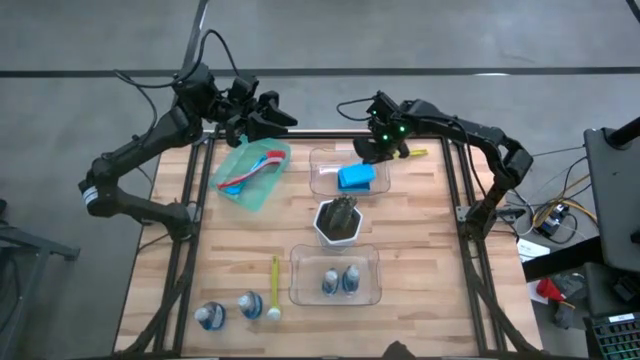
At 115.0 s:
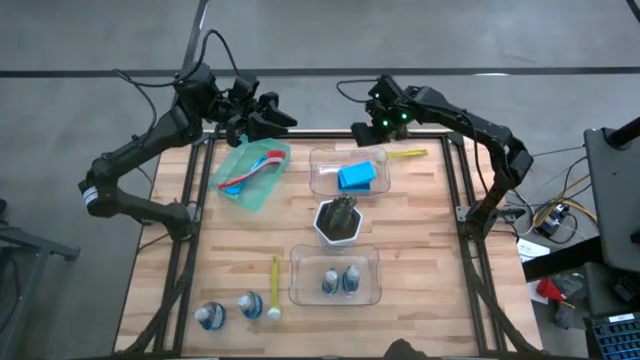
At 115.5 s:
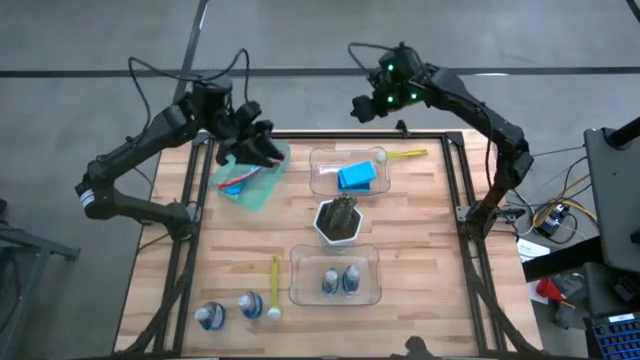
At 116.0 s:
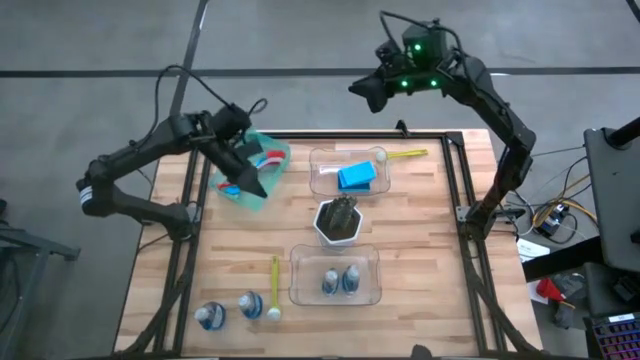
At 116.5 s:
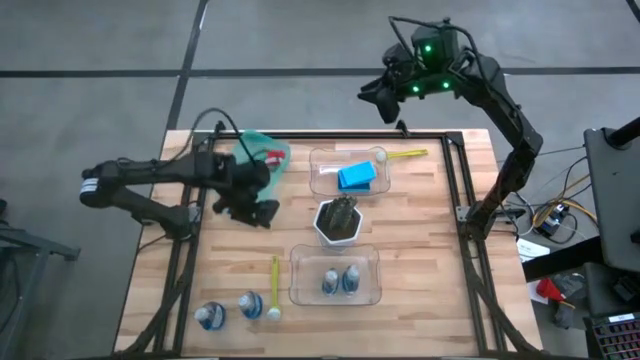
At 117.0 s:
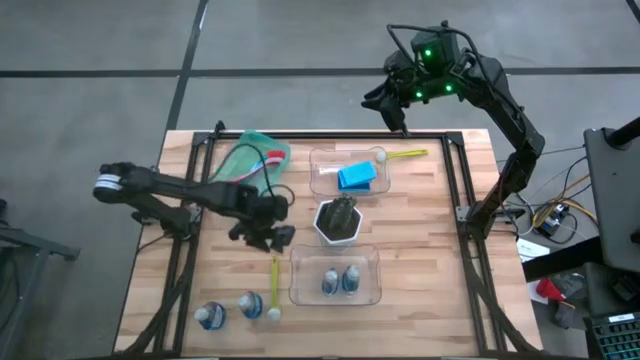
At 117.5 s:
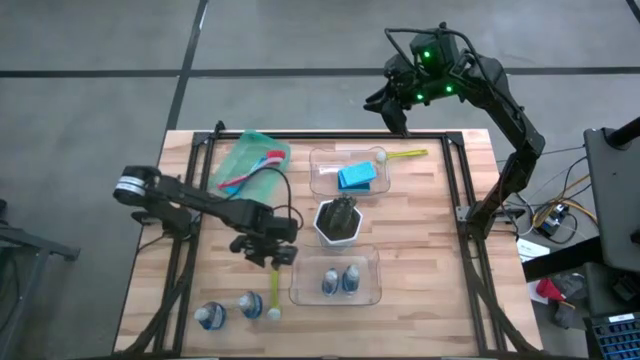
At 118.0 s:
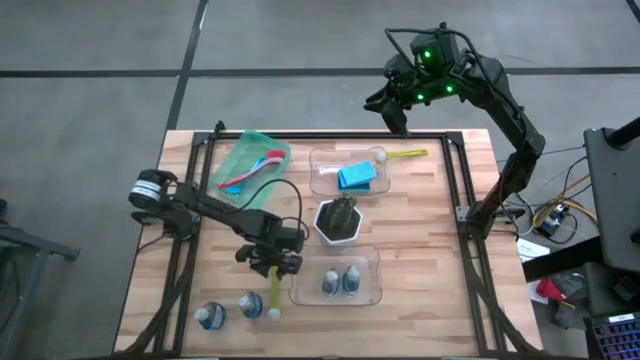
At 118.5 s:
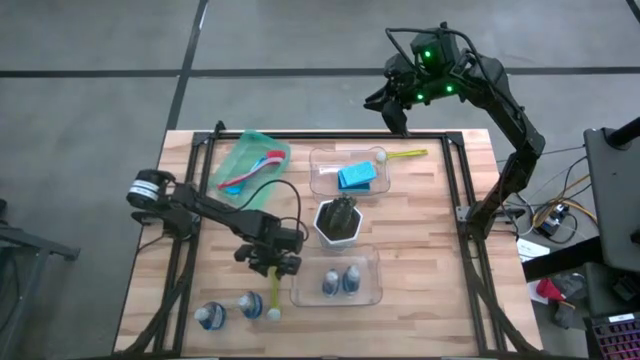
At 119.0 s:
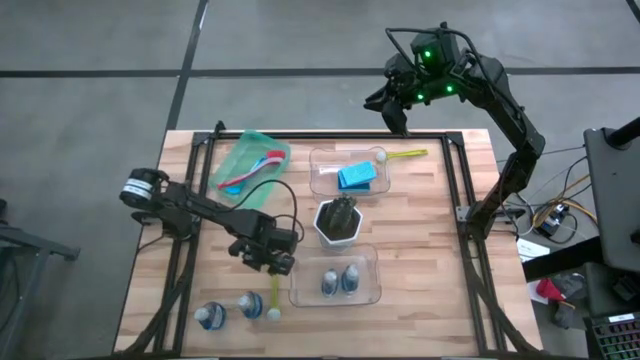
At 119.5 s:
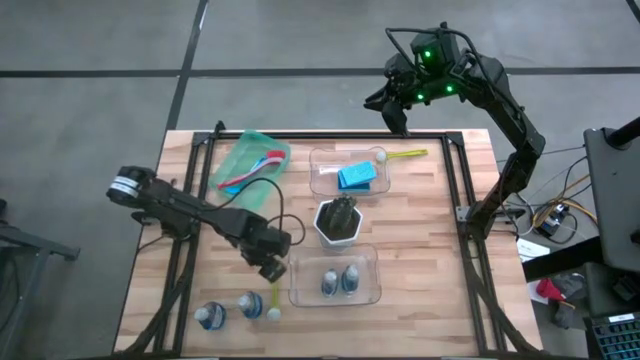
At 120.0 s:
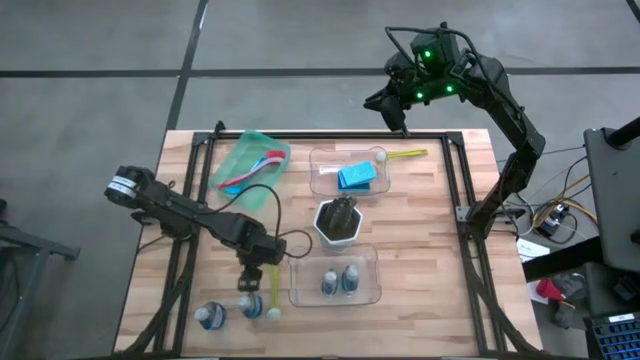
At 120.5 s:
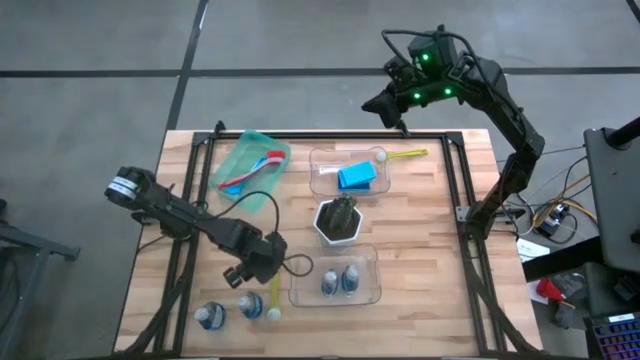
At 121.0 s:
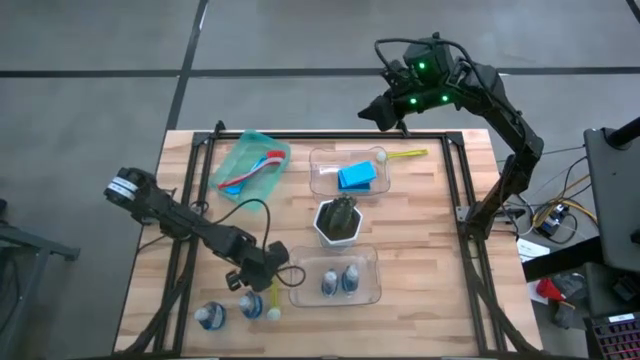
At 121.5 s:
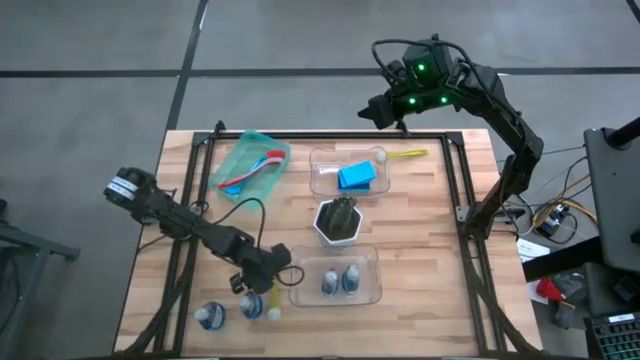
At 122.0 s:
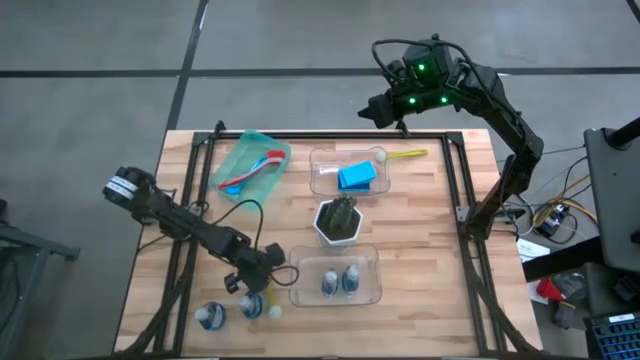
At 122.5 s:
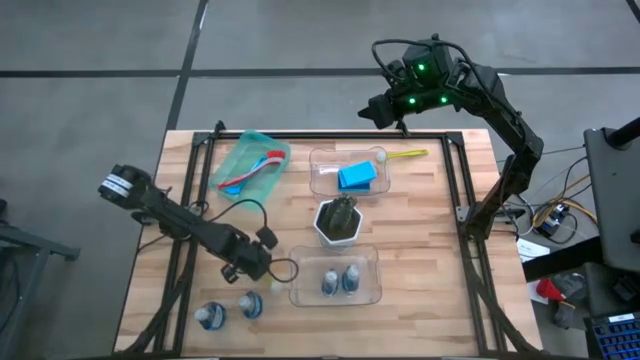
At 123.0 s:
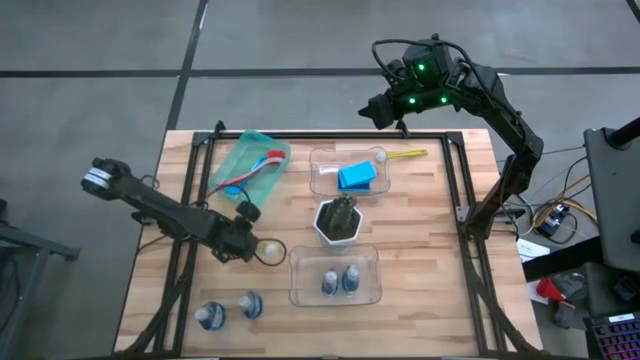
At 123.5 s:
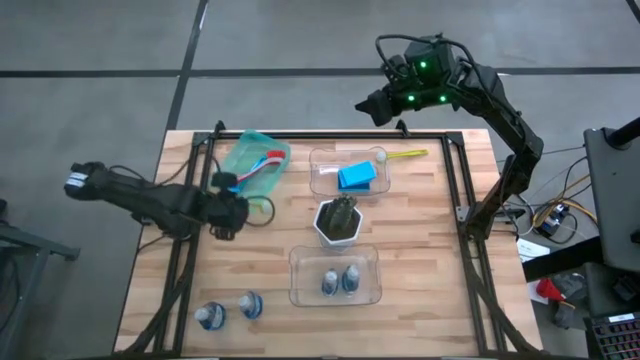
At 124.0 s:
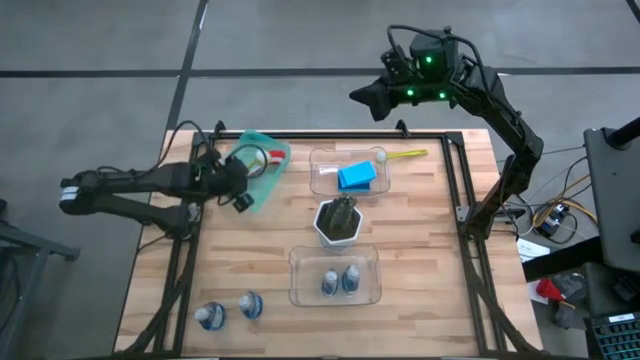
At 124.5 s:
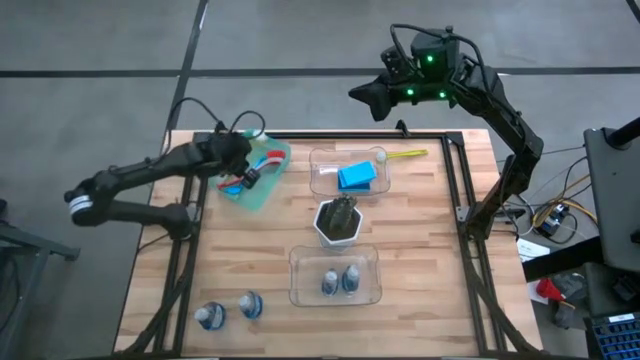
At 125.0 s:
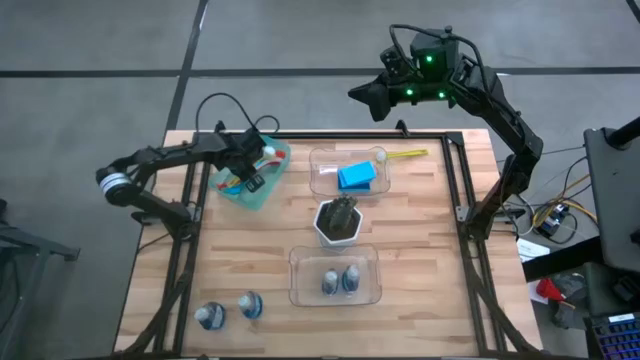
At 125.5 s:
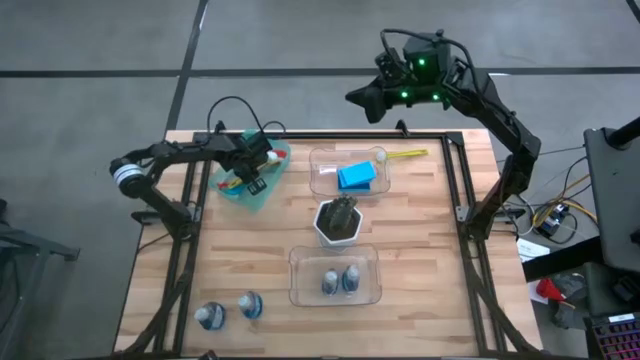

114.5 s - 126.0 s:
Task: Pick & Place Kitchen Sink Supplies
Put the light green dishwashing brush into the light blue bin

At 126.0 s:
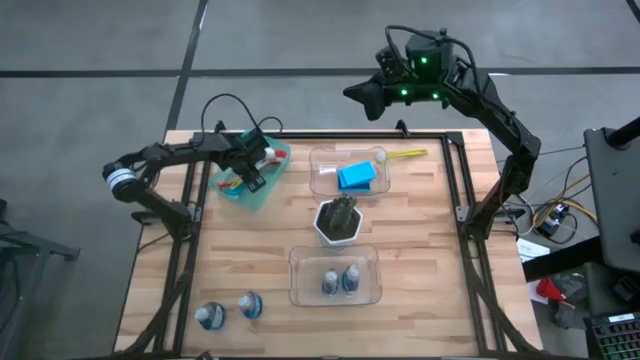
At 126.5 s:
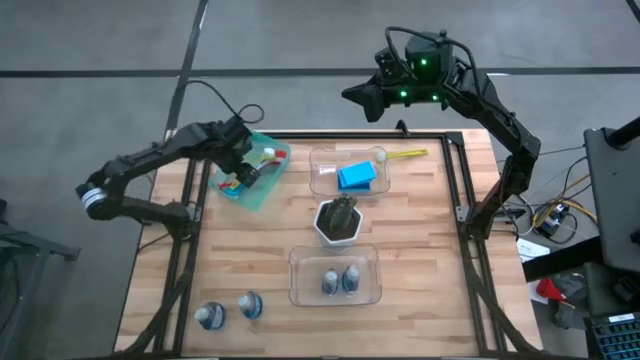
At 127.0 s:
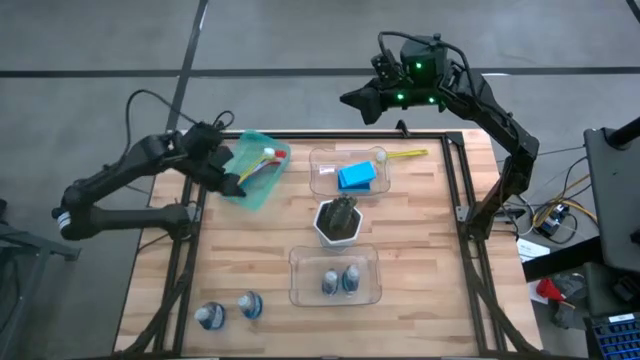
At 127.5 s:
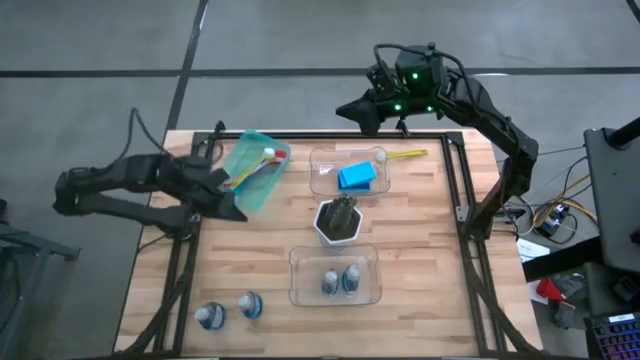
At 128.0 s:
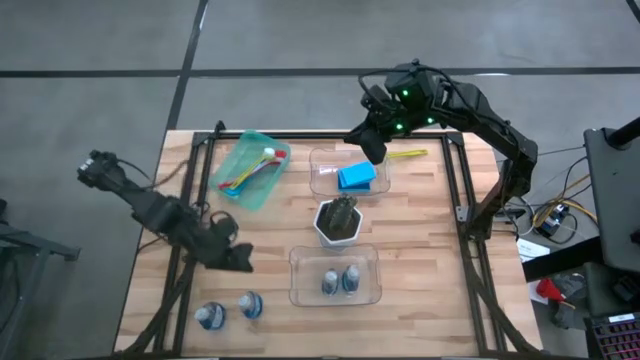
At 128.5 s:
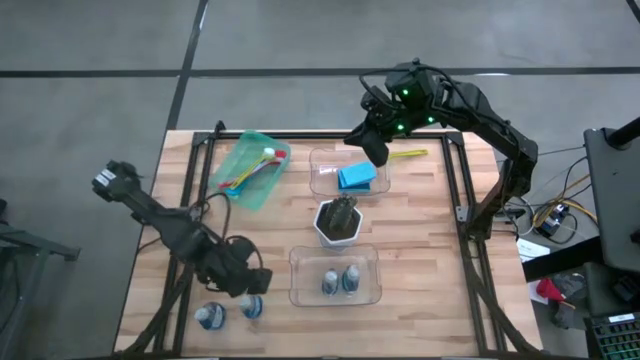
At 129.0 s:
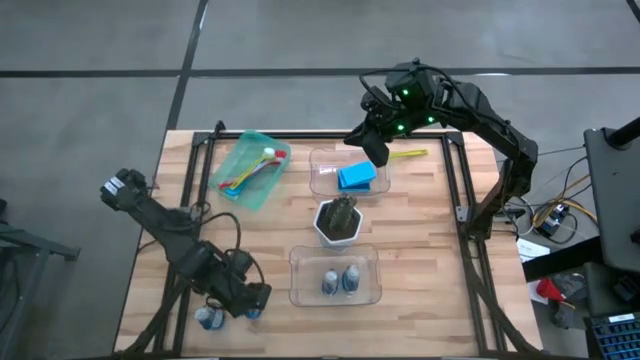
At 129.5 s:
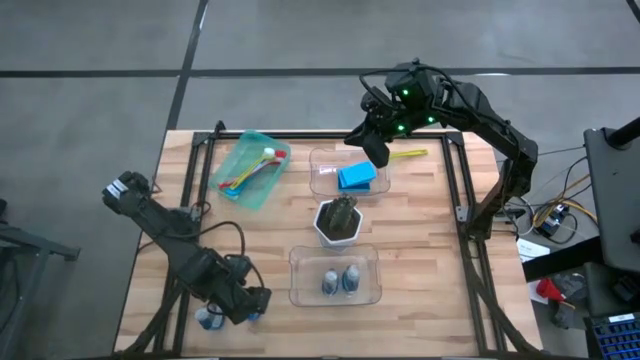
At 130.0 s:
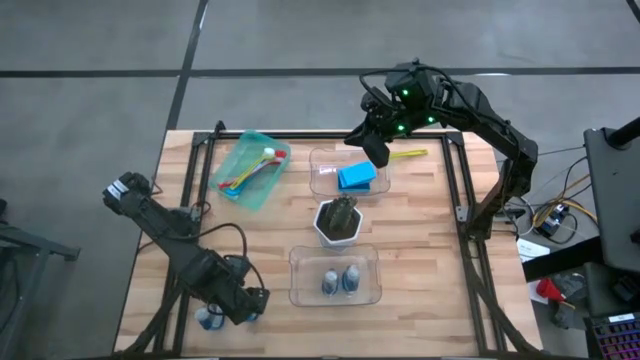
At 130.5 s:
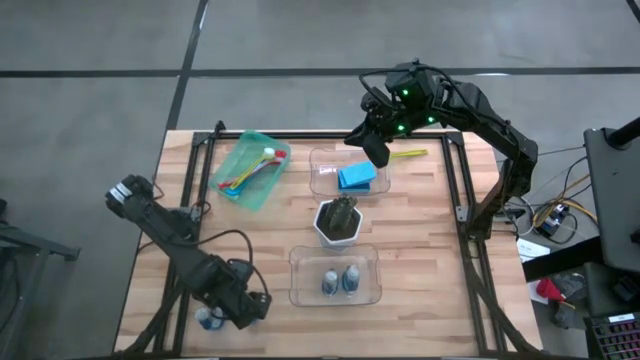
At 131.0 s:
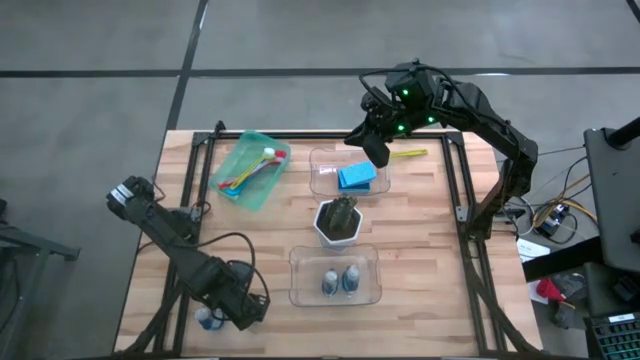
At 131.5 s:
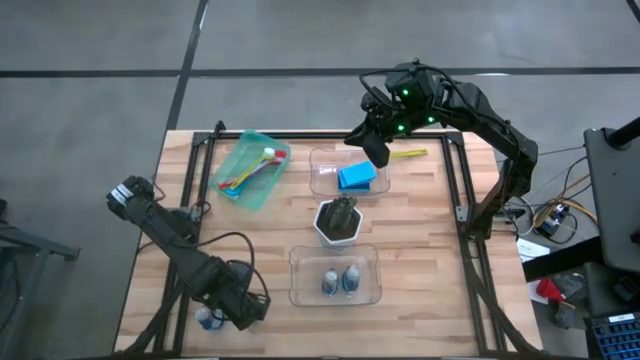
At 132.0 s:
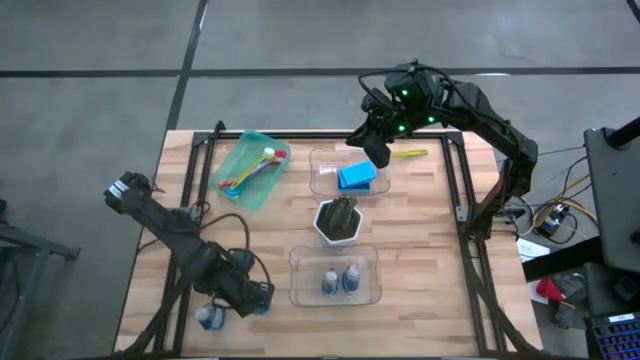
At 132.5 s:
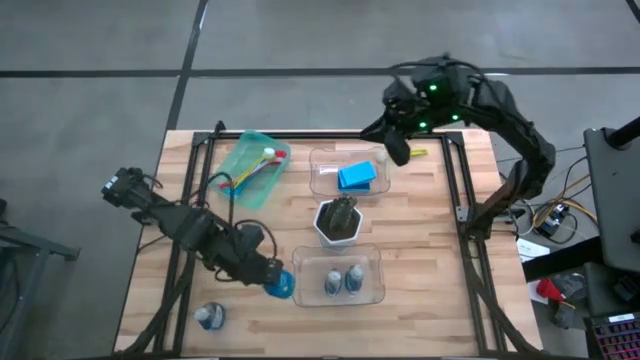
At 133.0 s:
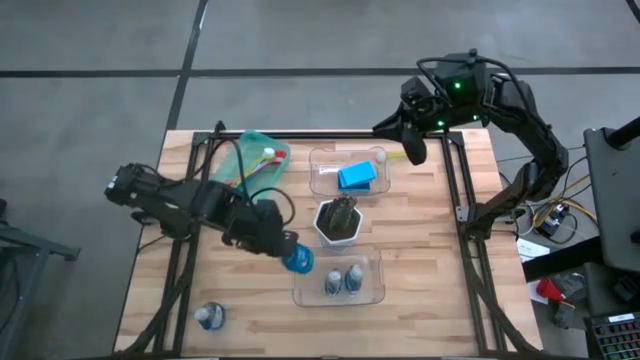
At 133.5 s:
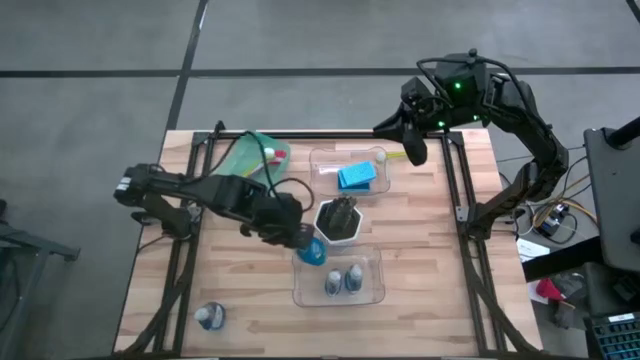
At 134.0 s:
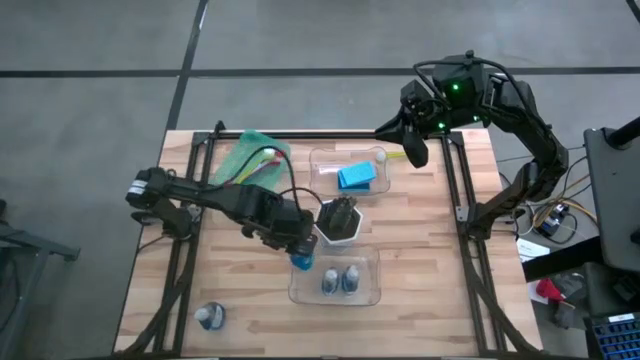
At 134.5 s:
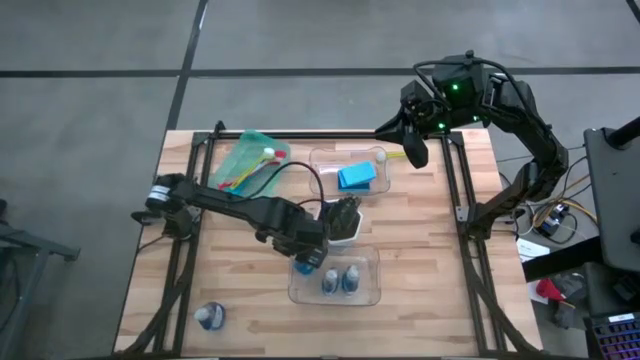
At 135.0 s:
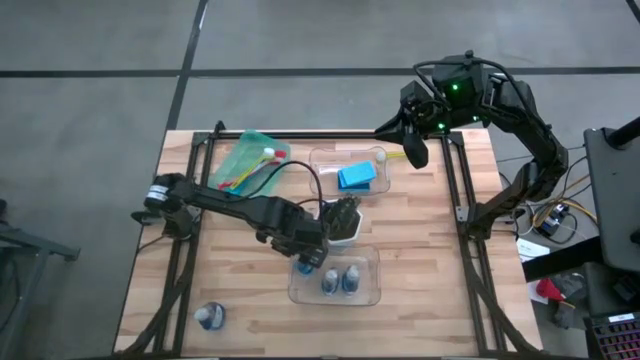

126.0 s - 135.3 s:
Put the blue dishwashing liquid bottle into the bottom transparent bin
